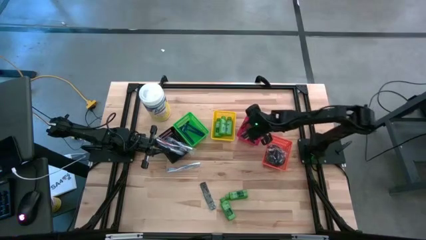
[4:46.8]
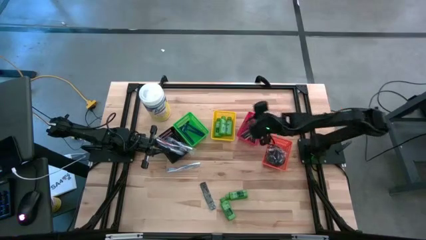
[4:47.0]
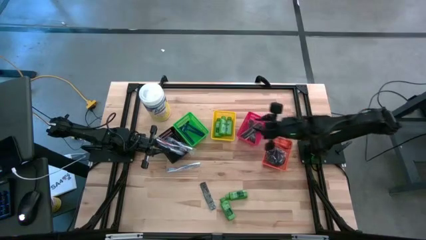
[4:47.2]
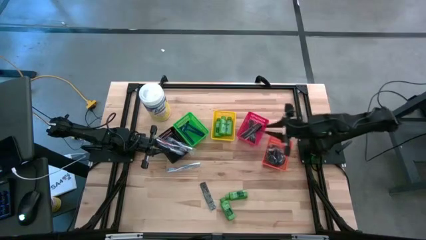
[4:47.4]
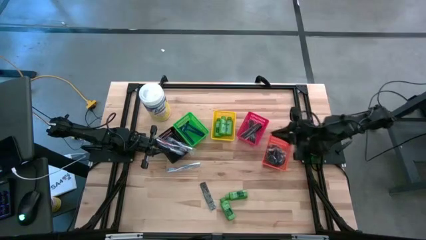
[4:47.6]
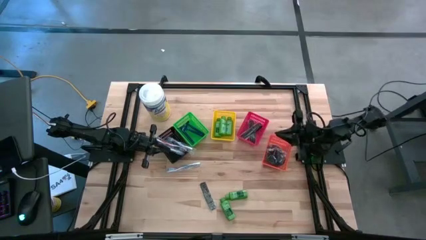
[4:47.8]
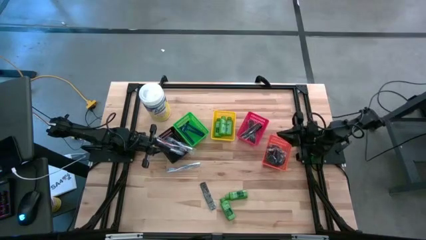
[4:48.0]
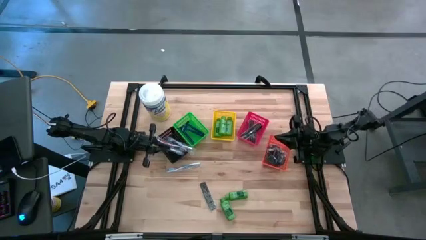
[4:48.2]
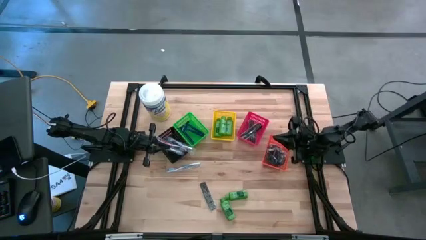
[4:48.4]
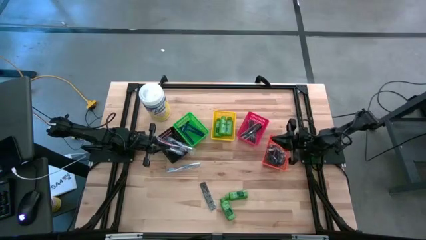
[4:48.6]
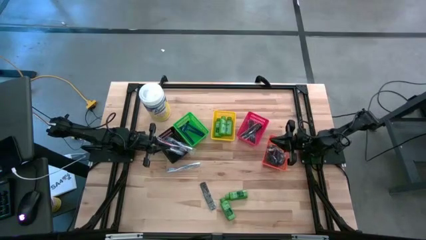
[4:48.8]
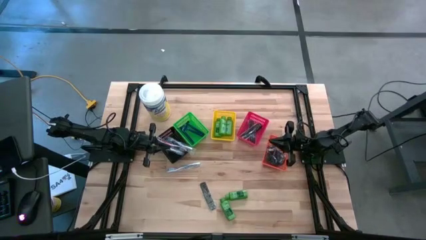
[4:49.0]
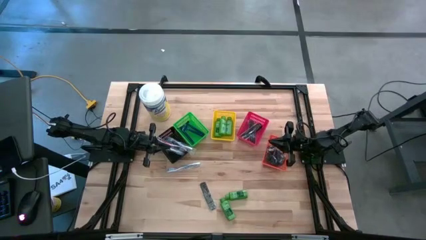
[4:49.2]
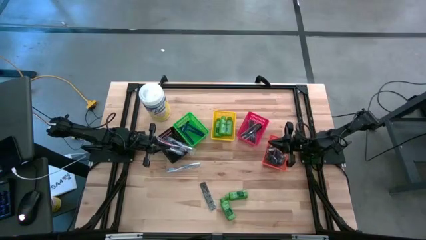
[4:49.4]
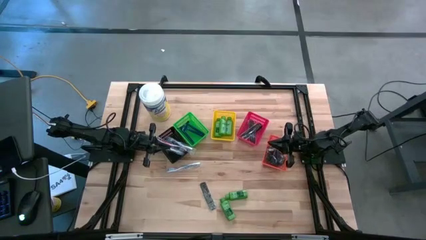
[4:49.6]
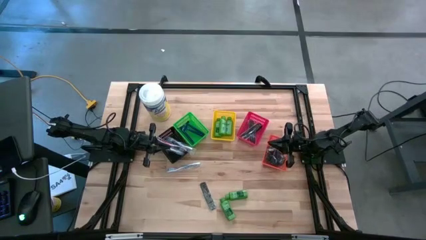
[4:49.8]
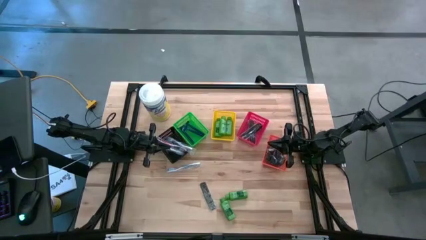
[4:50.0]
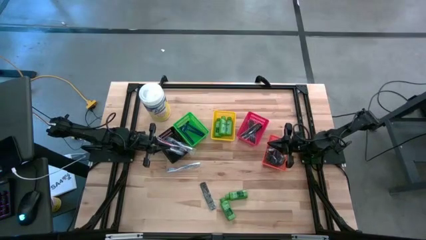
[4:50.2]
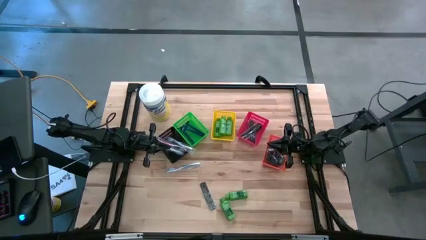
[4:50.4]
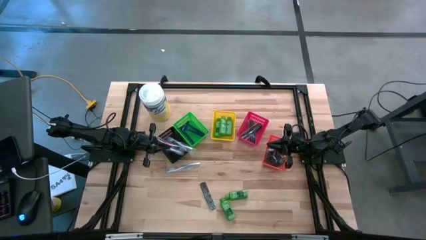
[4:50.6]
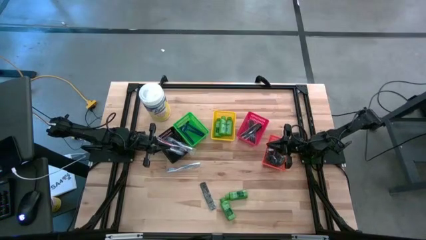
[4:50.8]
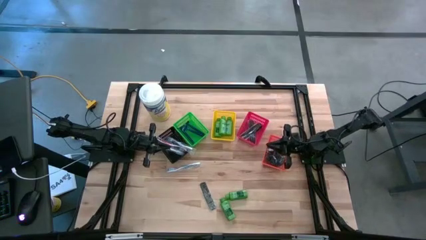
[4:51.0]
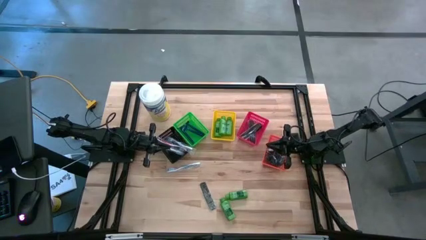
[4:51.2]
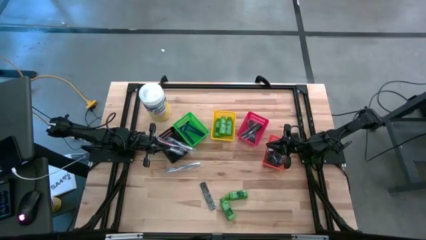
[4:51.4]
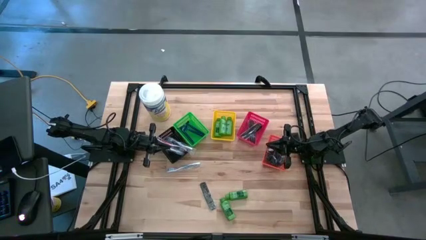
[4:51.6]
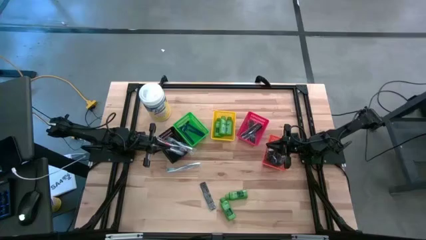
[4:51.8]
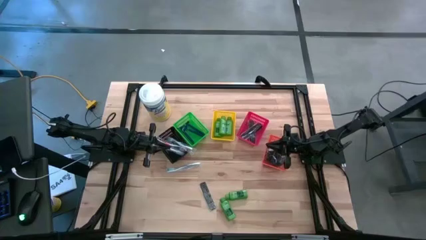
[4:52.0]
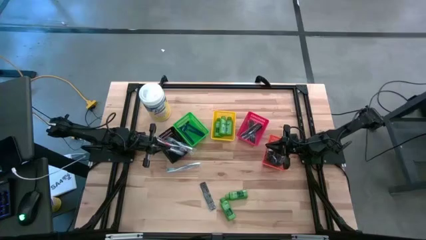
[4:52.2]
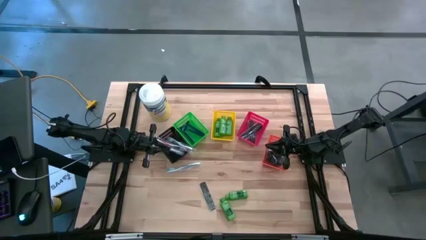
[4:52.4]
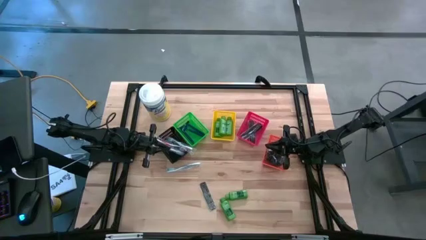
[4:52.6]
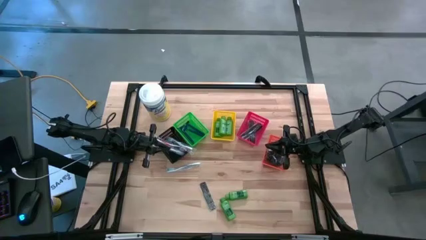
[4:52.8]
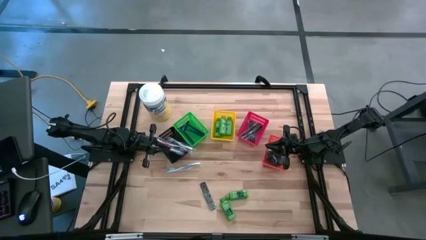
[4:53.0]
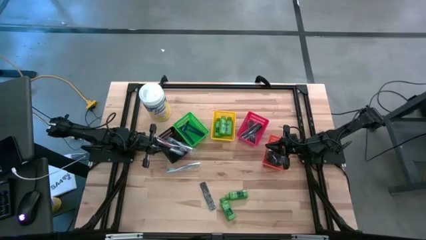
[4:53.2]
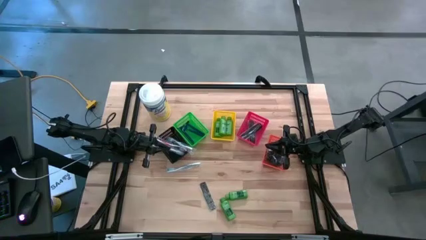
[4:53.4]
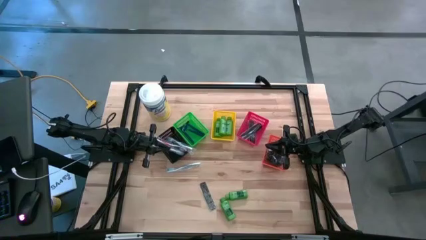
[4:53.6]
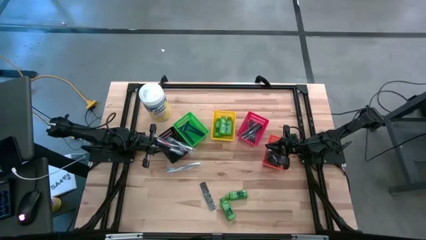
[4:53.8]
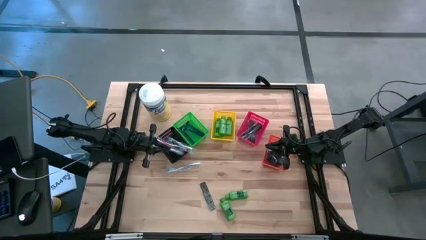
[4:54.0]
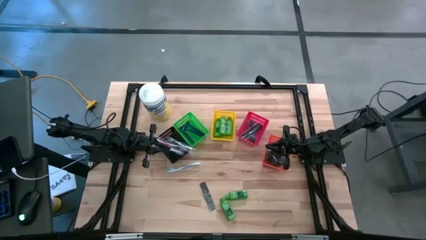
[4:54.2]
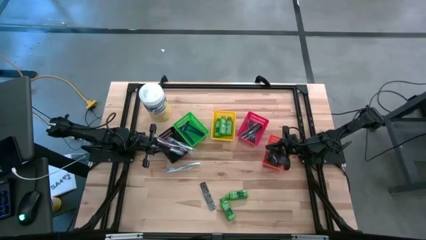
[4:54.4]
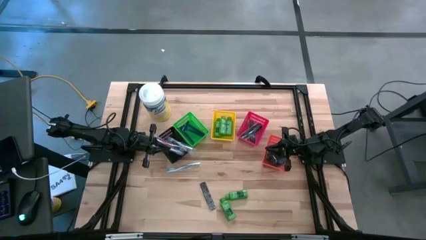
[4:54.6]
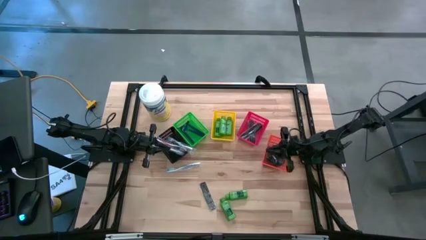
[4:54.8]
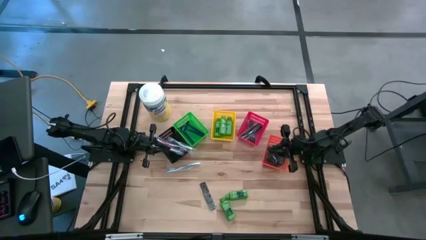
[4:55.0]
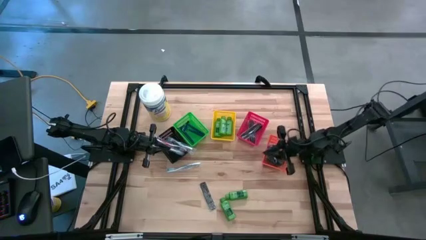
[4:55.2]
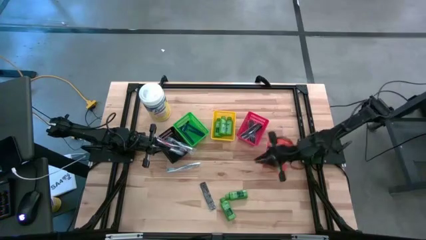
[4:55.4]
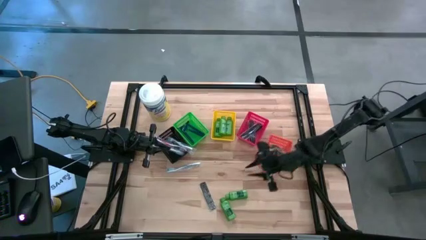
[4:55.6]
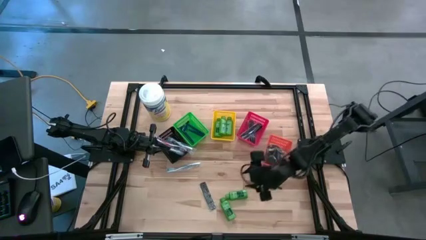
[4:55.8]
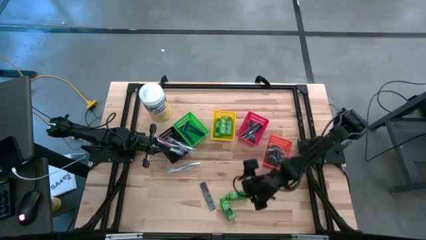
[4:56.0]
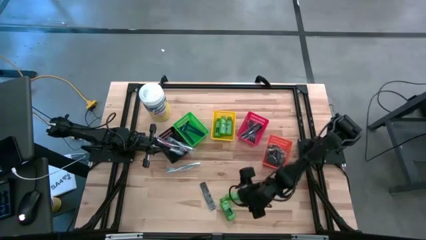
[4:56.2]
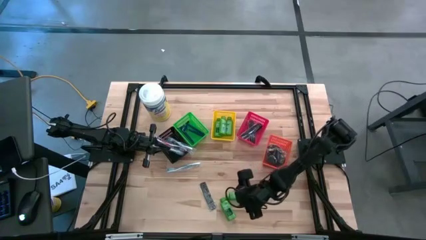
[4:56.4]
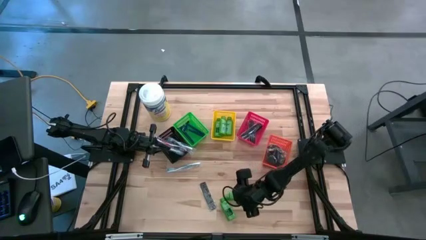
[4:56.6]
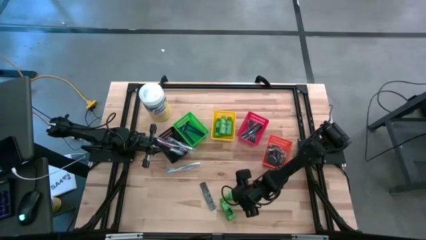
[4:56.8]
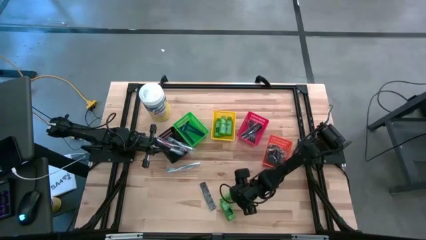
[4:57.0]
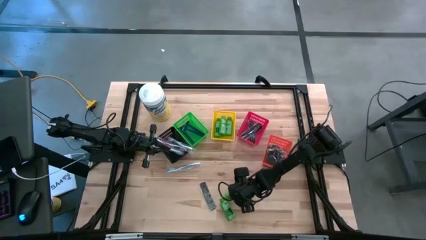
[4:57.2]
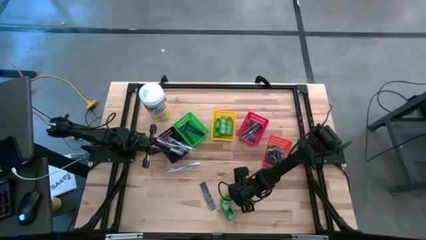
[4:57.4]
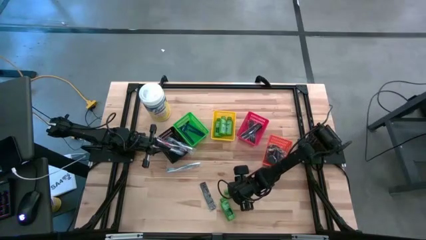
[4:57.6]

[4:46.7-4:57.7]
Task: Pick & Place Travel size toiletries
Put the right green bottle shampoo into the yellow bin
